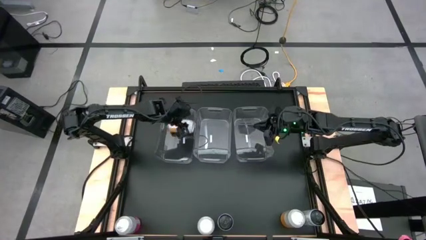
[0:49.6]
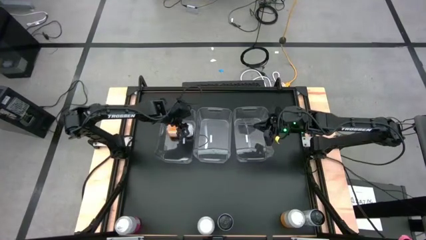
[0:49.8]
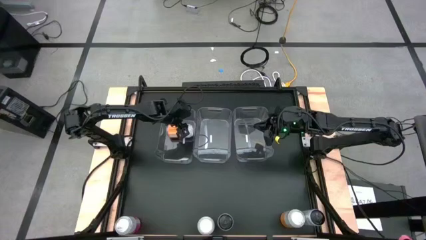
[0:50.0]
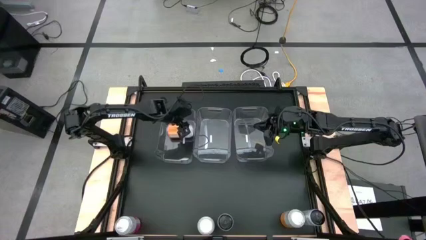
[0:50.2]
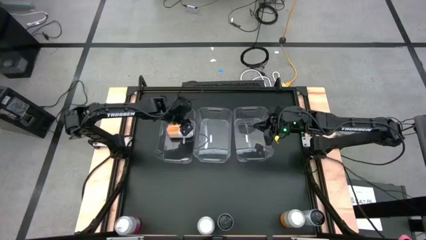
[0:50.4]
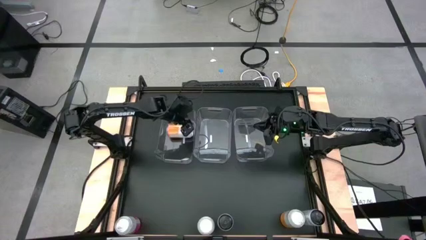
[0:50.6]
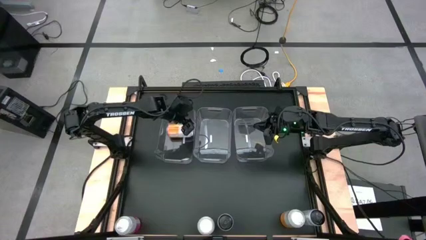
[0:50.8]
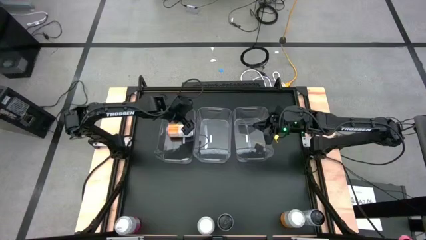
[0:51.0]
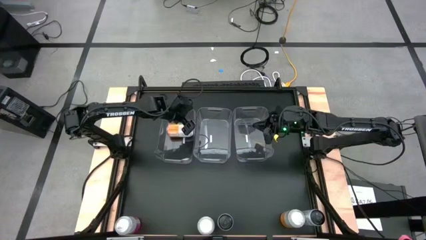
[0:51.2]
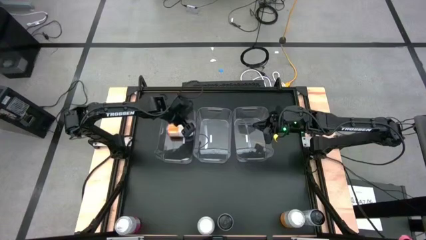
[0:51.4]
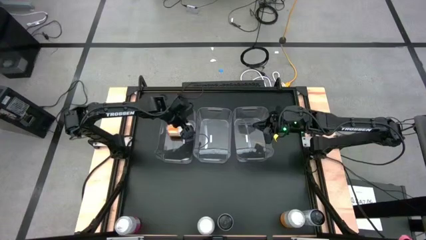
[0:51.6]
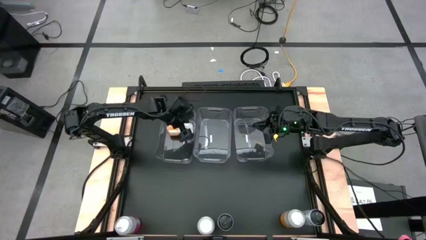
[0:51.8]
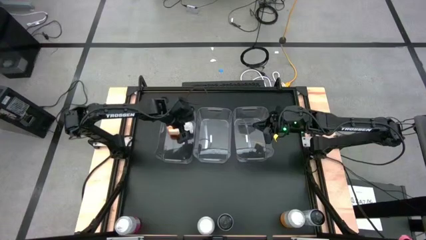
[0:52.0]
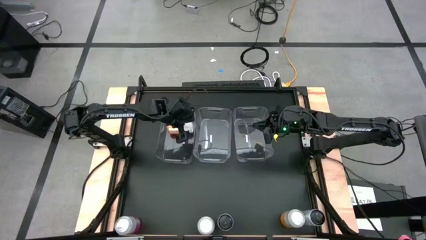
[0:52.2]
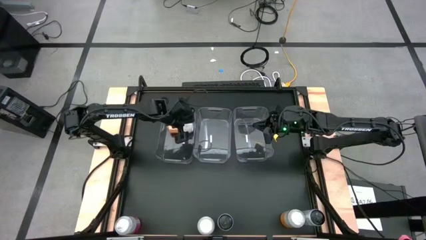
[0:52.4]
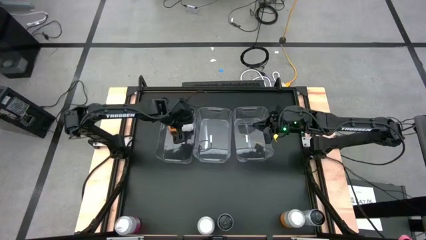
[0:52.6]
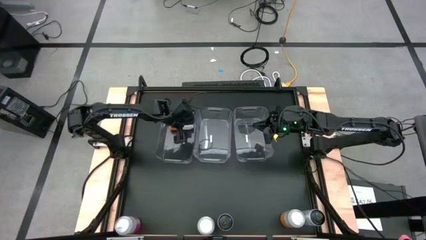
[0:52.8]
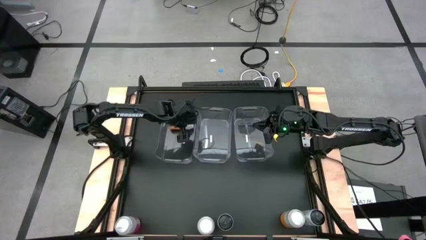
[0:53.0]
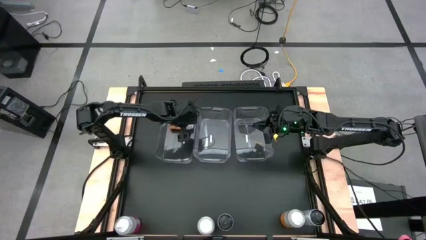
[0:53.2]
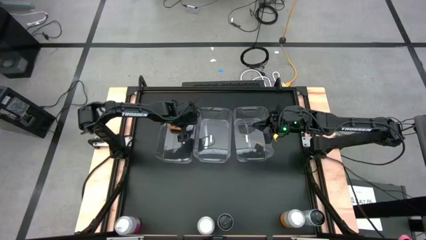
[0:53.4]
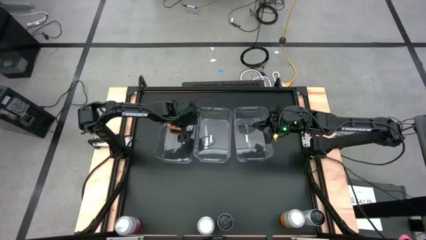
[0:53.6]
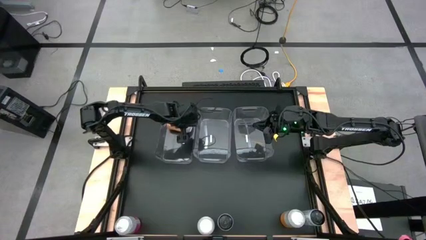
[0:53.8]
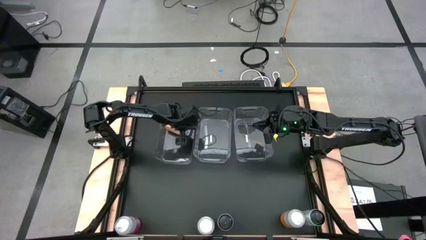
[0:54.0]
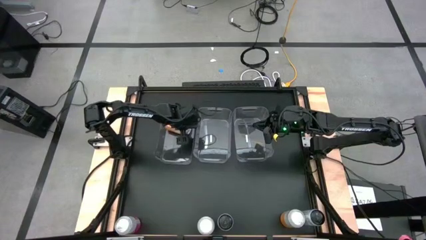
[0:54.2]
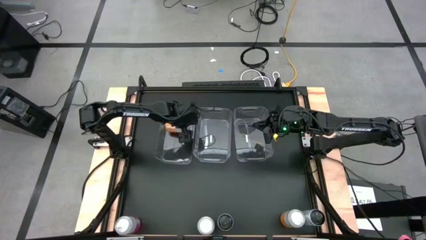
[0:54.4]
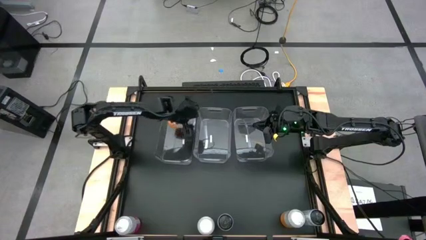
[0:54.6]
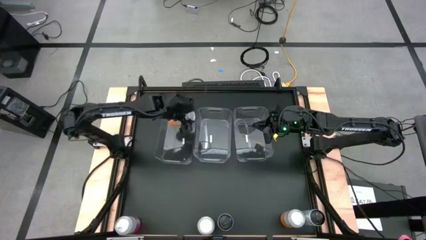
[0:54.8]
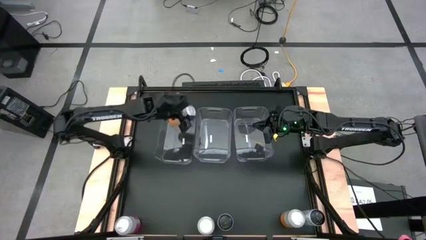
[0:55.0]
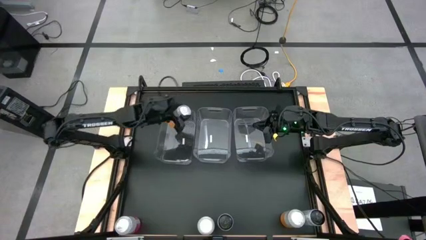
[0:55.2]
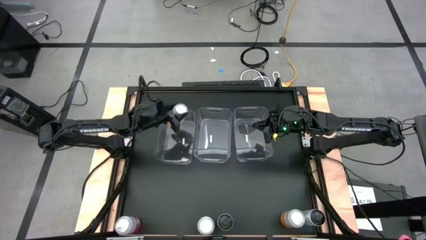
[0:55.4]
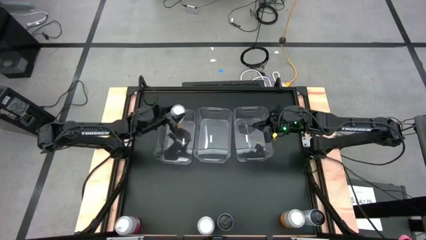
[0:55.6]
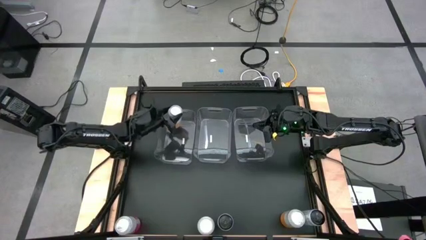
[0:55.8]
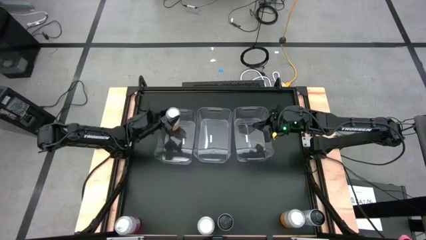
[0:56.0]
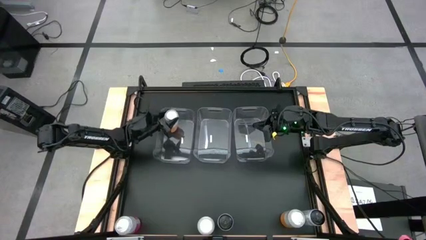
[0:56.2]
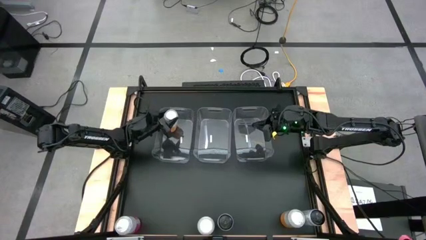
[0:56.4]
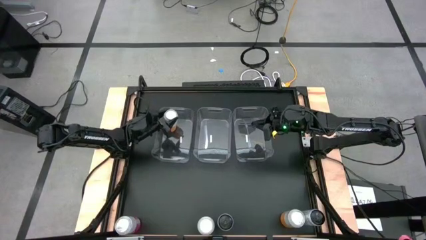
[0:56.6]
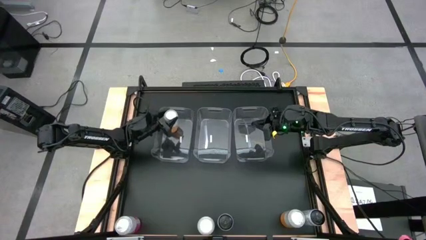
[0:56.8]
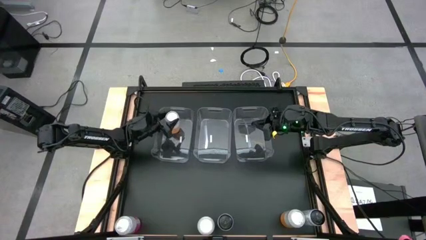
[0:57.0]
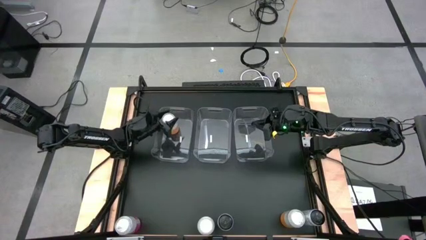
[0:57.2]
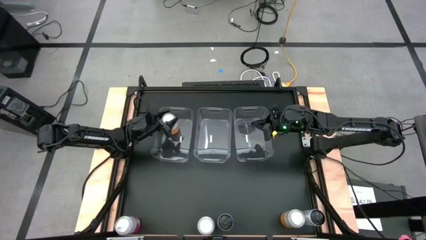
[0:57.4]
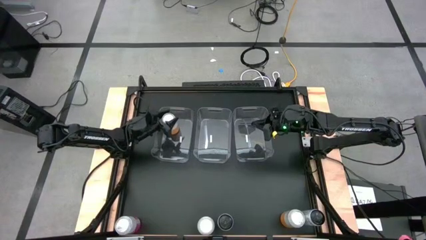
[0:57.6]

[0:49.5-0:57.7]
Task: Sort soda cans
Put the left yellow-white soda can into the left transparent bin

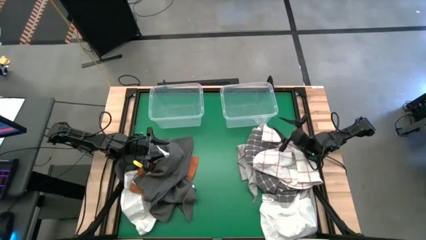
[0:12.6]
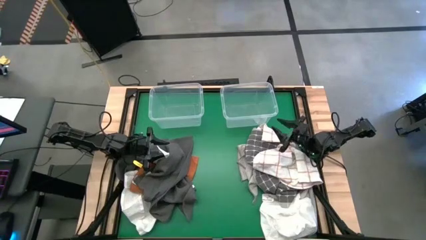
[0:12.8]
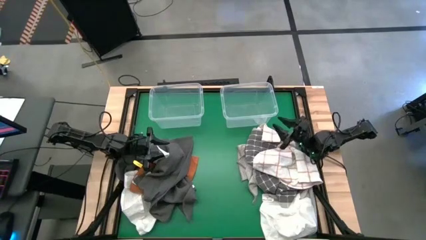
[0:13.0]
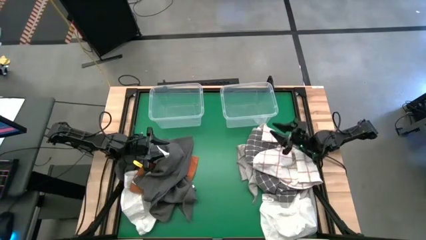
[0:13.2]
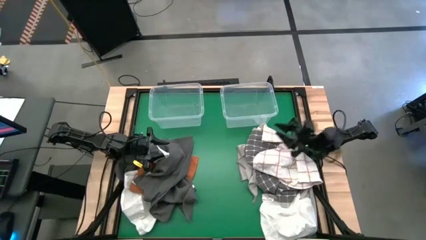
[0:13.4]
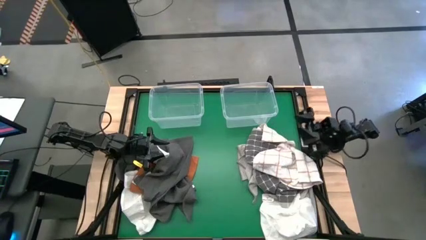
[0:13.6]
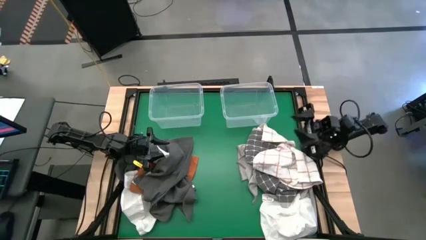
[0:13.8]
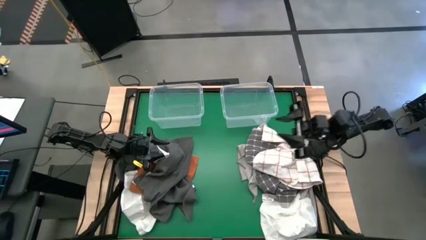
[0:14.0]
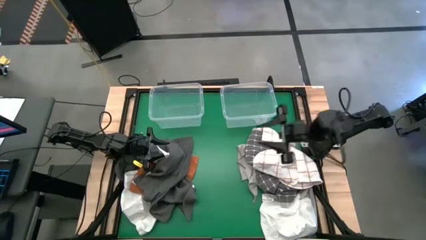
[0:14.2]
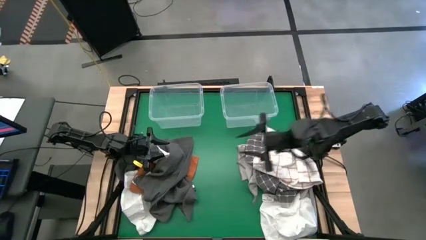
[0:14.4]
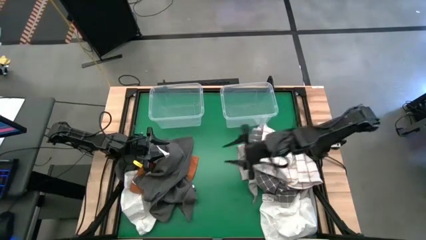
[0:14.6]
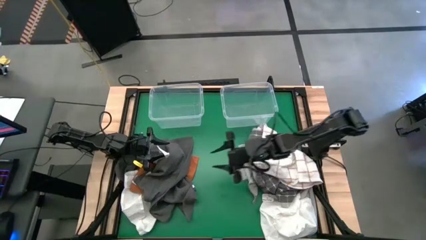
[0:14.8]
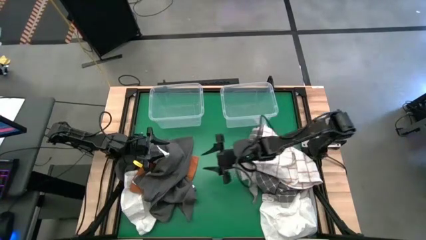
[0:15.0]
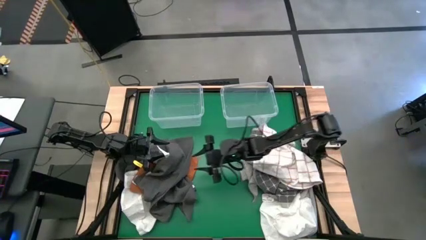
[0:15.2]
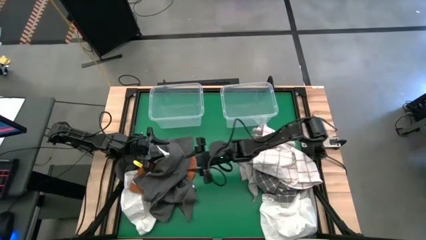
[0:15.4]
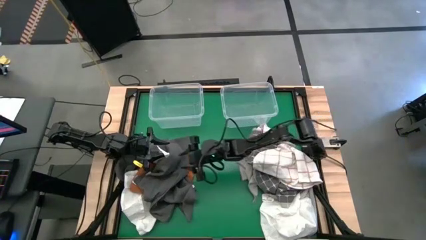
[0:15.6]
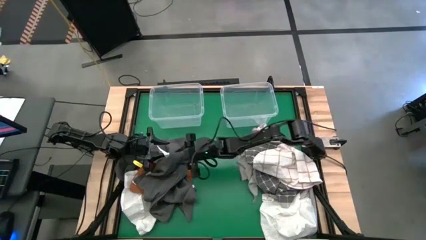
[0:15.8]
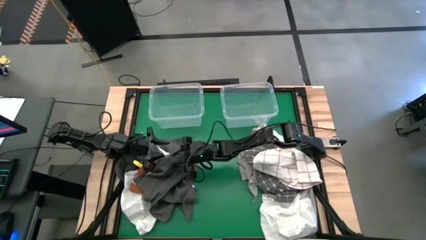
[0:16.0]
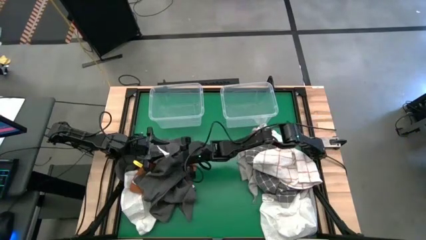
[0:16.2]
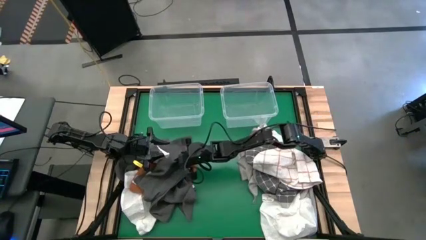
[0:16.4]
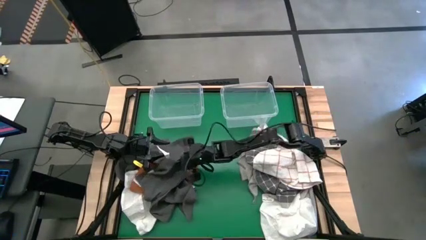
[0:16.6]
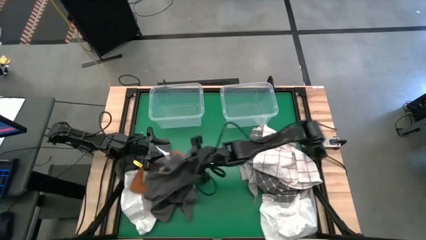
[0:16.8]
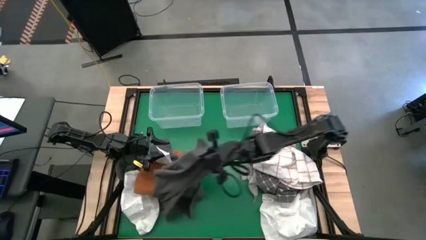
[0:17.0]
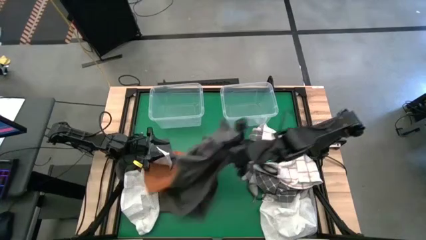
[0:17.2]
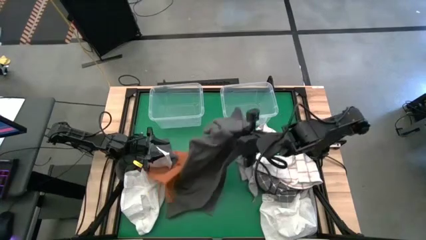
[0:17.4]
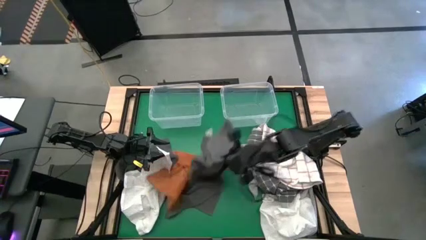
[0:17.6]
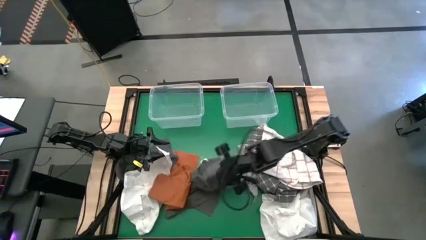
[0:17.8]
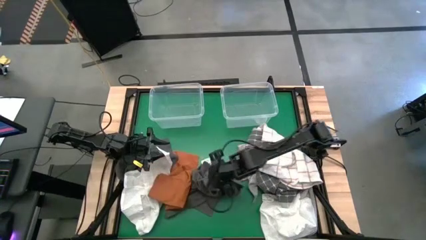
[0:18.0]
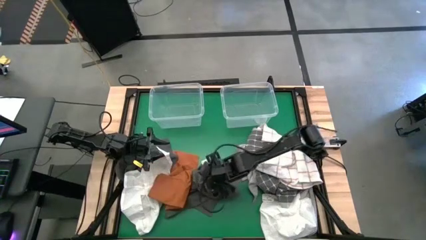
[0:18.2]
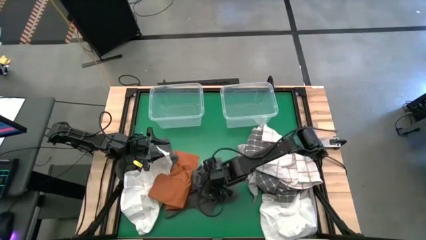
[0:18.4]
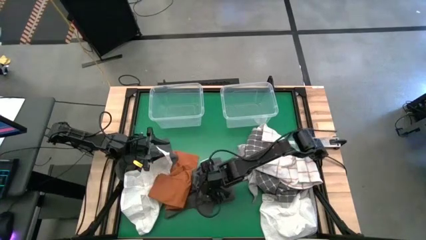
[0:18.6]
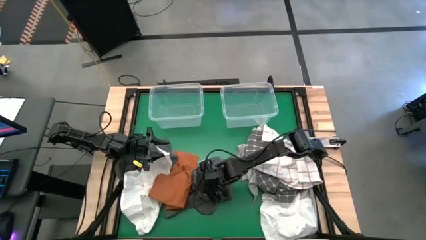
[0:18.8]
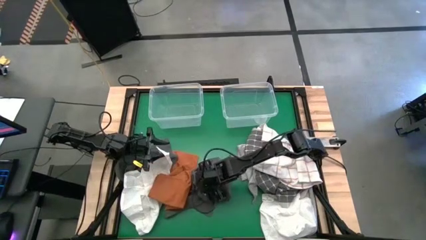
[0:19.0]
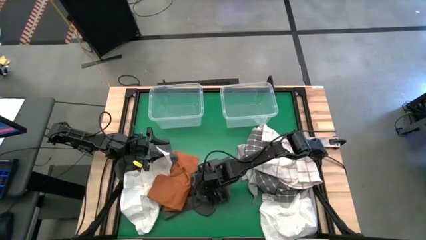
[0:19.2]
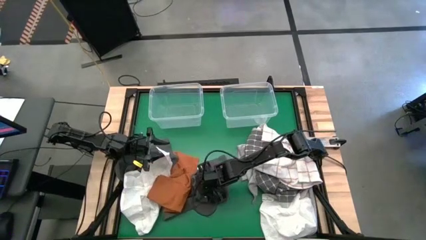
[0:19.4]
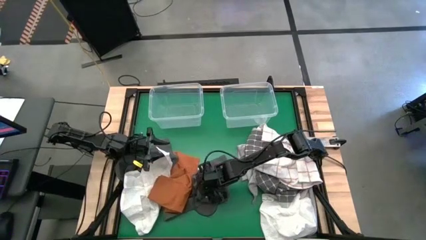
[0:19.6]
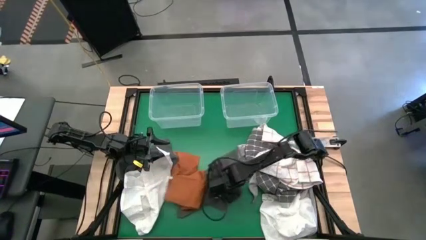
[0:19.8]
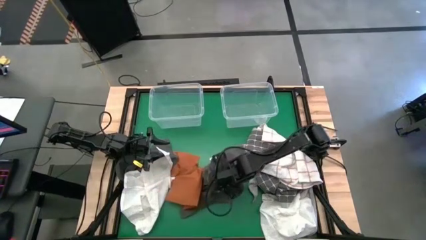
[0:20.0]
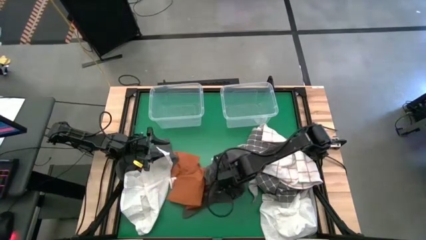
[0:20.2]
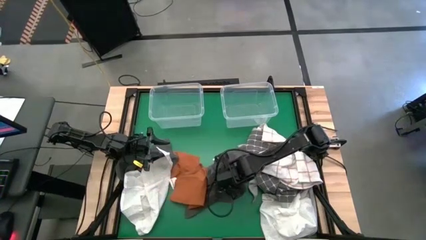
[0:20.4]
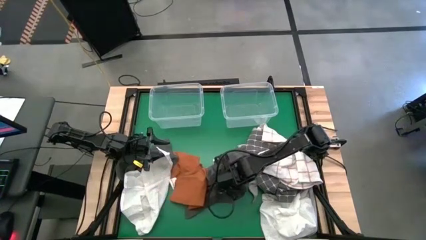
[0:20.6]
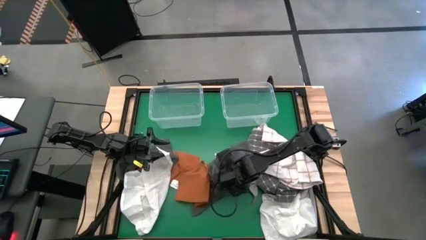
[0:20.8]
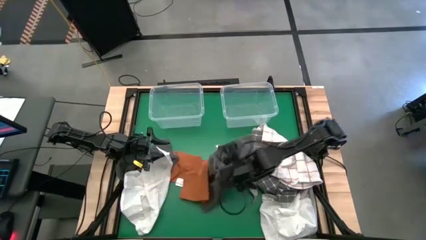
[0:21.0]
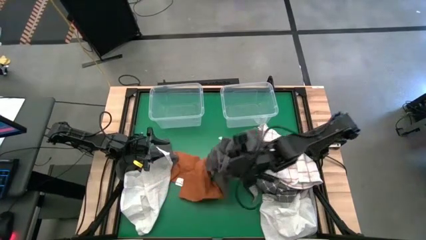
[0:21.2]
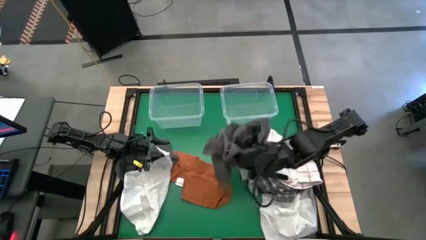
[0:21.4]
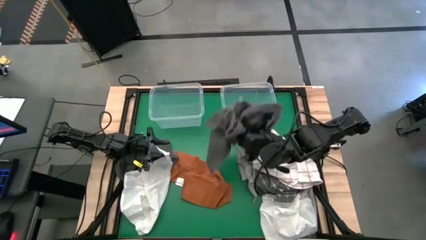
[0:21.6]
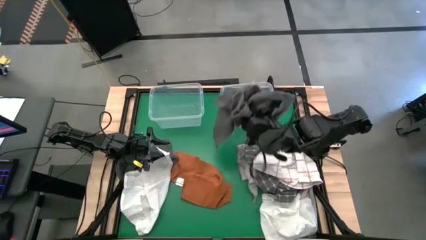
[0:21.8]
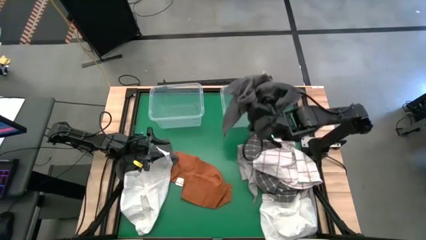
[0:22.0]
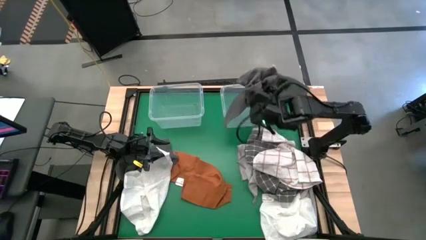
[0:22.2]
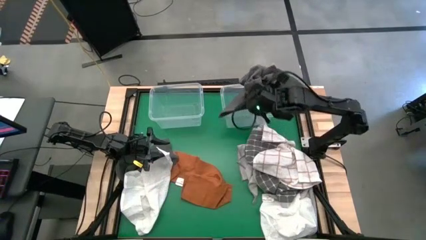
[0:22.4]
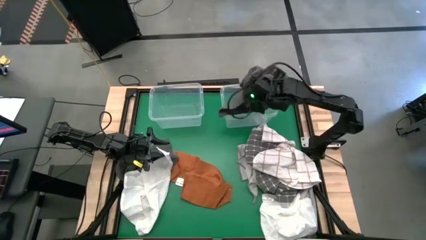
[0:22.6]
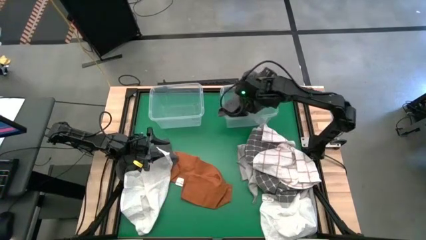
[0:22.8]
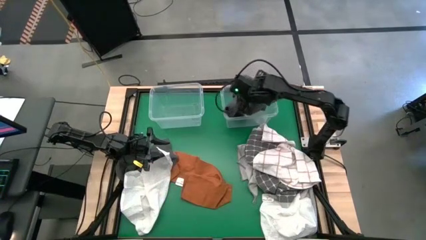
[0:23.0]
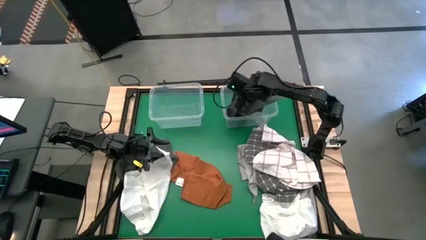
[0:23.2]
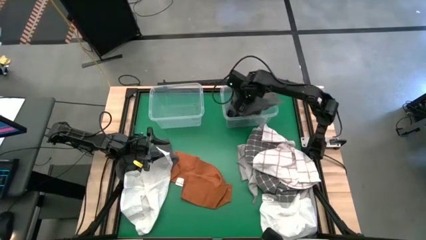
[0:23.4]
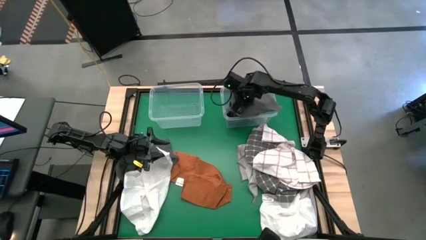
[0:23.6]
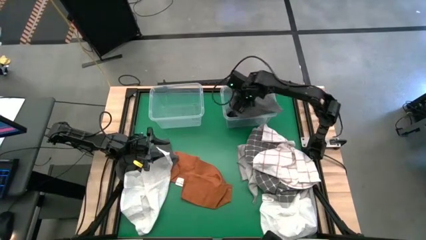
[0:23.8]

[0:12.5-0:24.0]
Task: Sort towels by color in basket
Put the bottom gray towel into the right transparent bin
